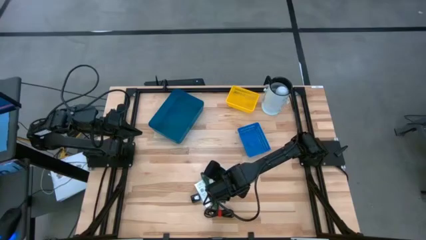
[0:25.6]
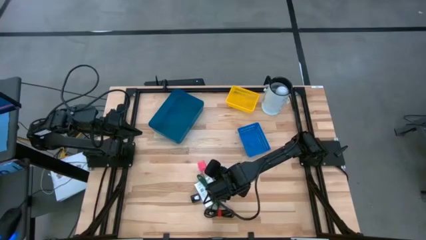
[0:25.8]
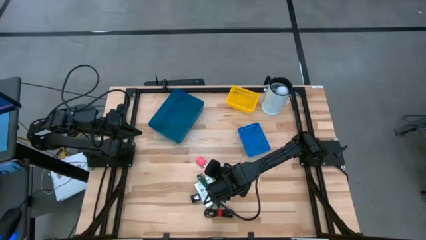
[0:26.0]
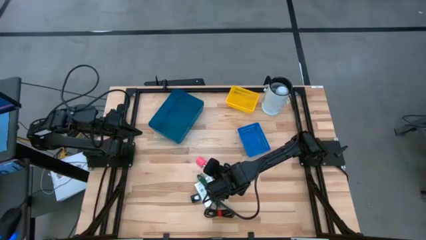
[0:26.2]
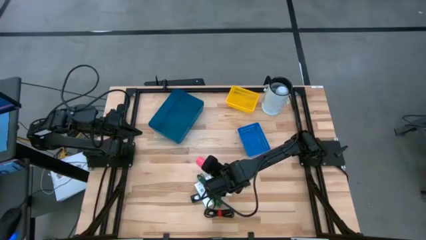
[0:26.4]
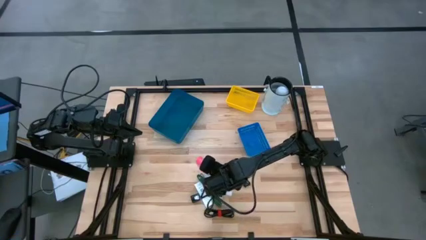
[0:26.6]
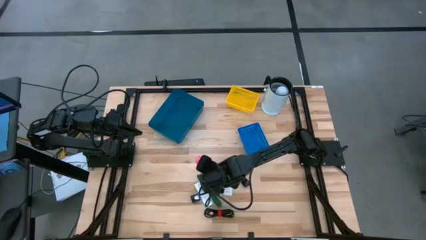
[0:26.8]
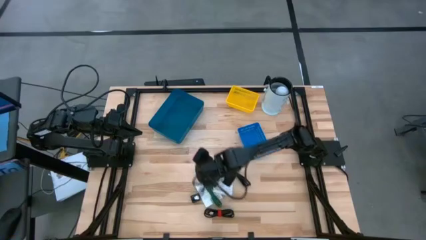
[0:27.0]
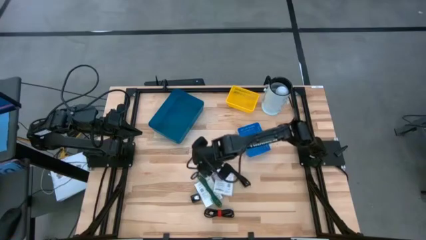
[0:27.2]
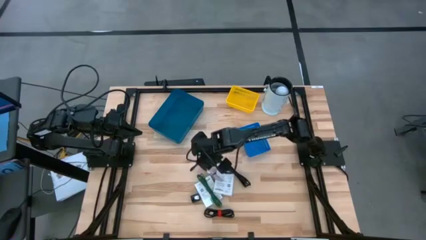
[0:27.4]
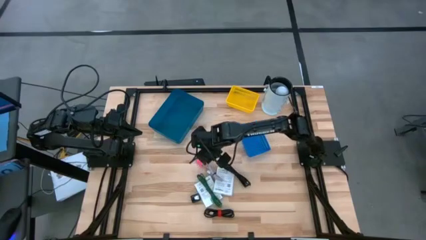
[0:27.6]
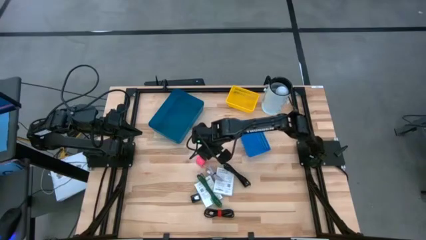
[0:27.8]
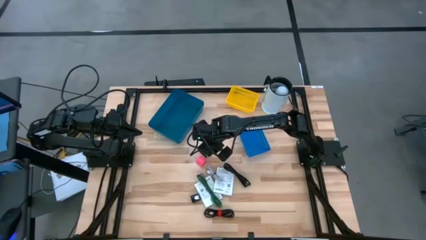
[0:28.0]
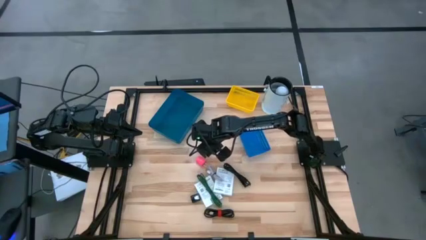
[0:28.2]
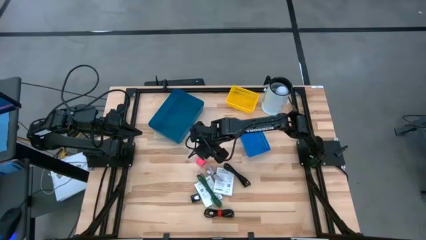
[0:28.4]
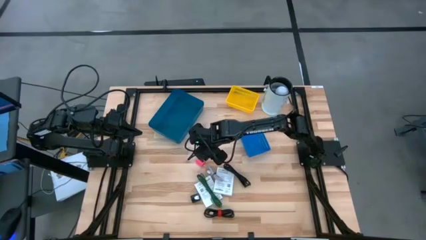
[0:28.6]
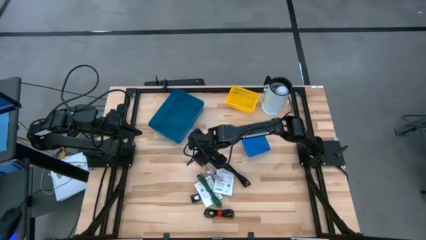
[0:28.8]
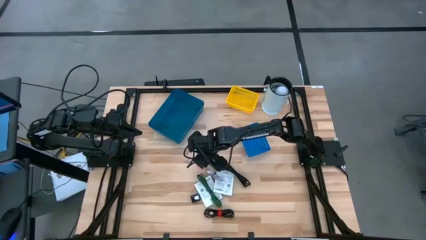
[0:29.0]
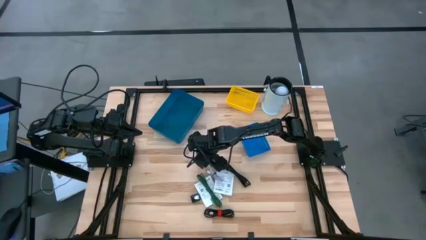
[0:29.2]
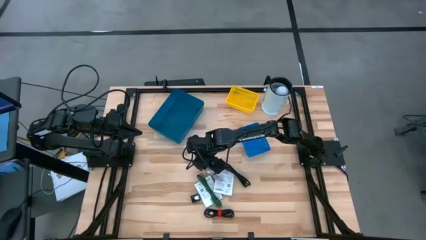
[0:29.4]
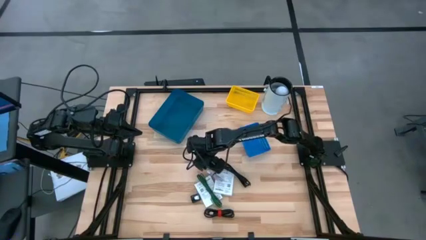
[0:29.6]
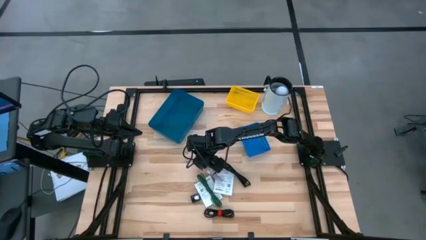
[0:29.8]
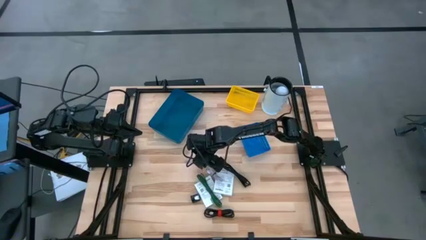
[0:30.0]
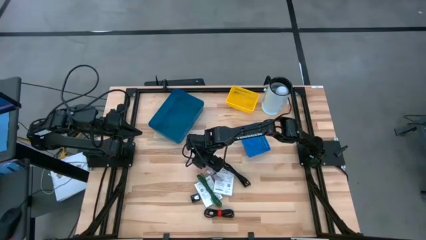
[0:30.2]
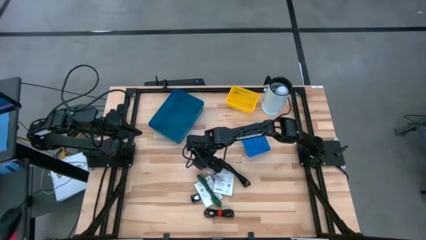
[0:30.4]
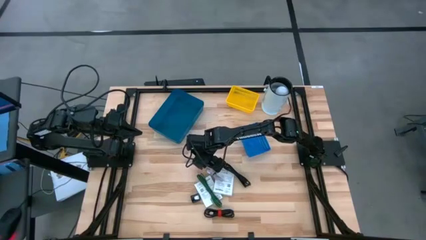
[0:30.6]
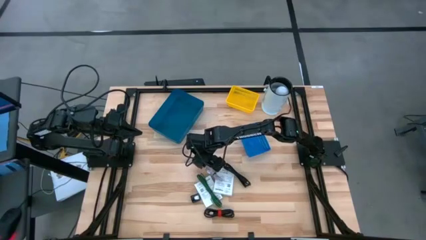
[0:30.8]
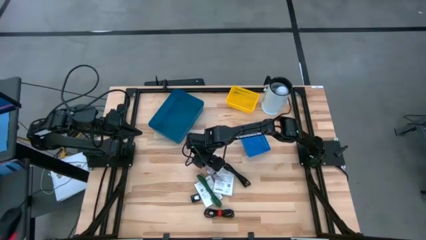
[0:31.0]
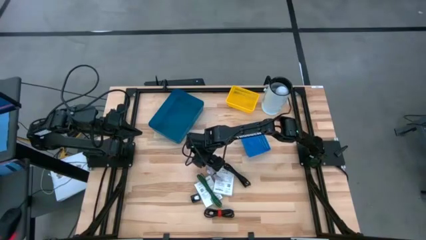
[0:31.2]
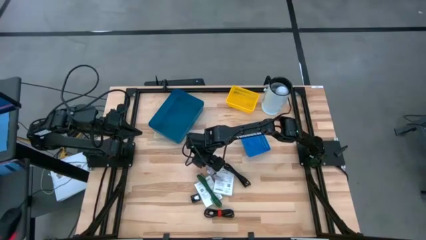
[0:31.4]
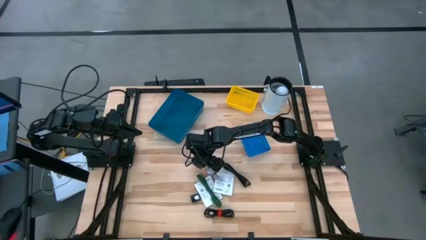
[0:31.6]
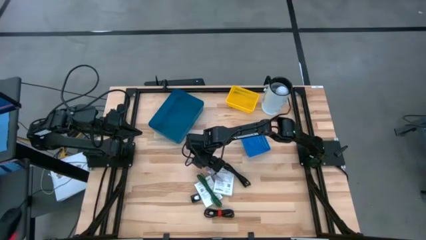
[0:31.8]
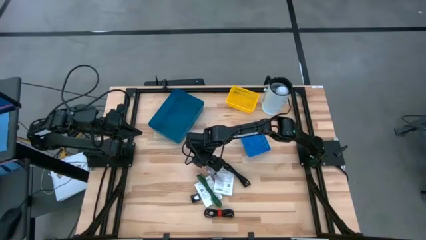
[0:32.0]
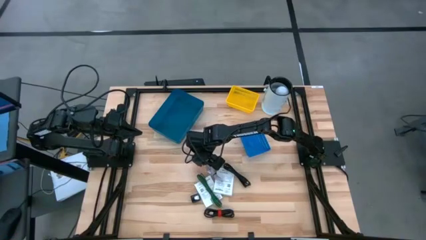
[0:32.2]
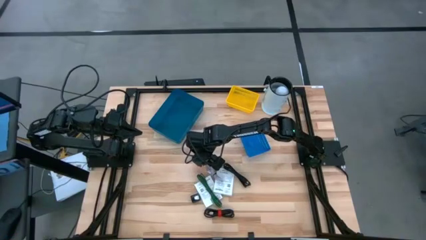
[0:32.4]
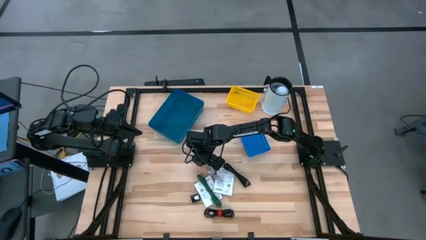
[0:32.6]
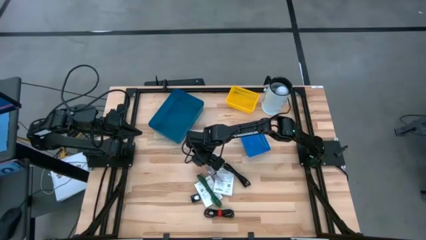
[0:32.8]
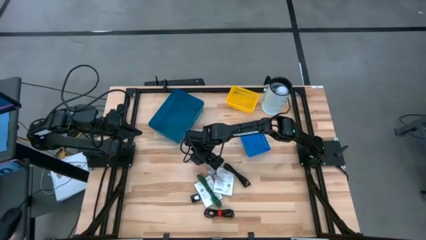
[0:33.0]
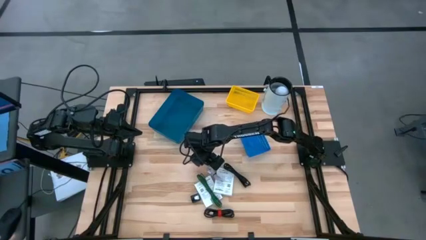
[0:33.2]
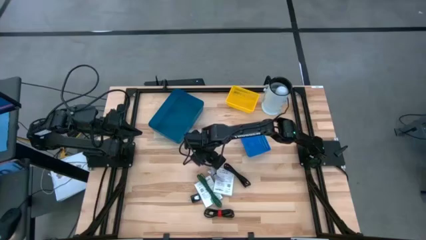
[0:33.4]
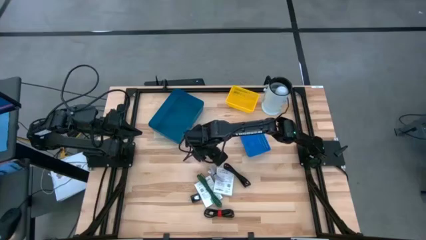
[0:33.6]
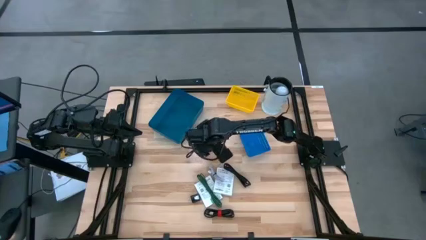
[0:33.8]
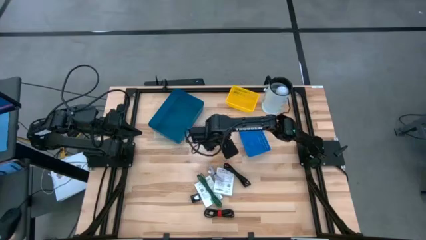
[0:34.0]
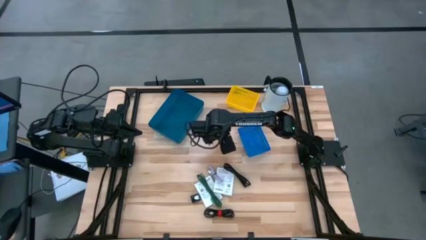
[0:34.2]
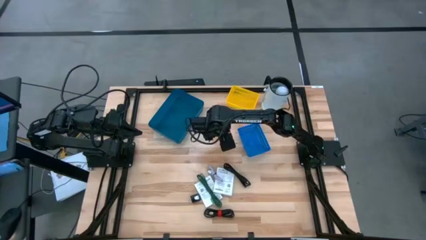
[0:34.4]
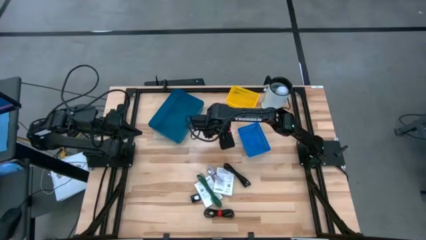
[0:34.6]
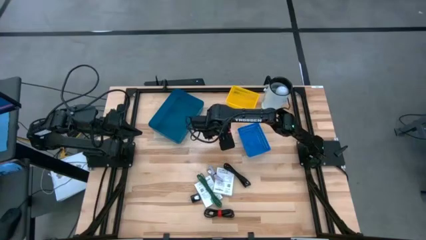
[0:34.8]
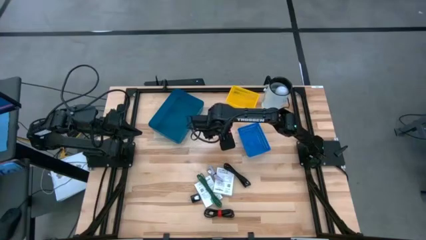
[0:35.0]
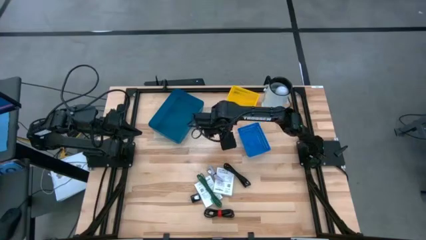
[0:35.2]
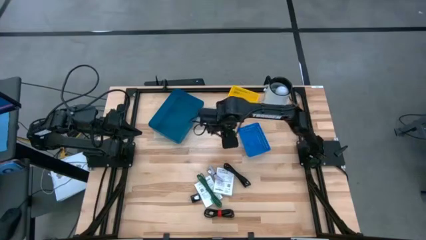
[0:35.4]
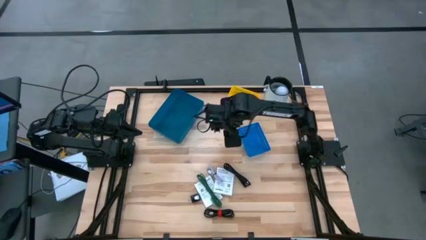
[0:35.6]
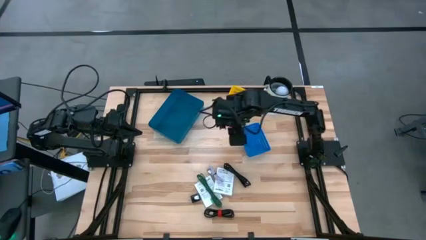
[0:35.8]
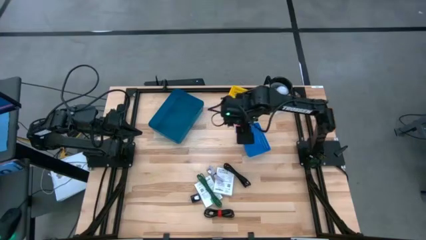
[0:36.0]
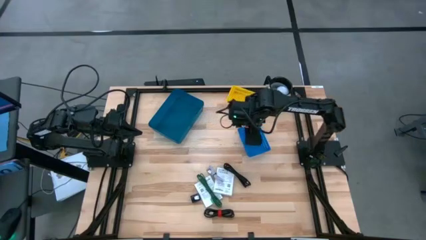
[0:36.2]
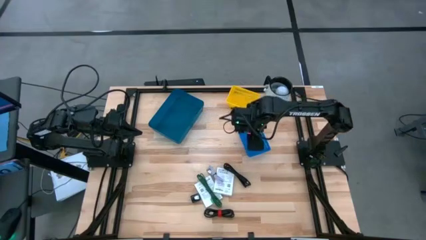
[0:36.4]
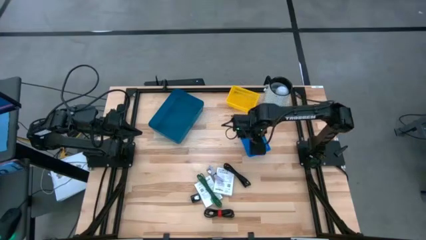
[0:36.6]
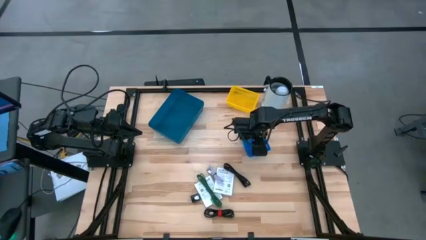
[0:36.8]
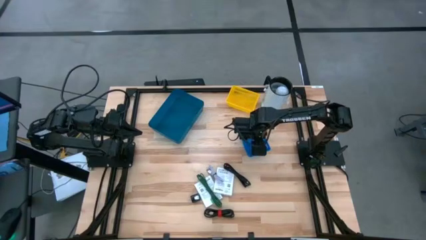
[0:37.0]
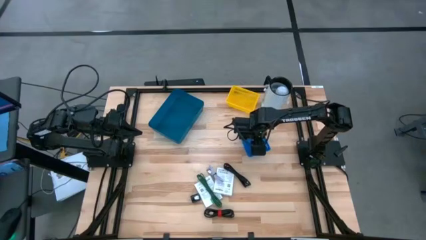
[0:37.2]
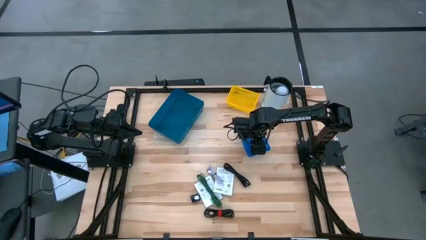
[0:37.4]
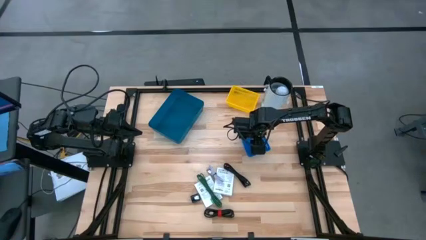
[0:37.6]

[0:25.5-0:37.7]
Task: Pick and place items into bin
Put the pink charger adapter into the blue bin

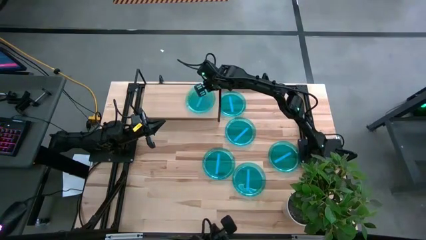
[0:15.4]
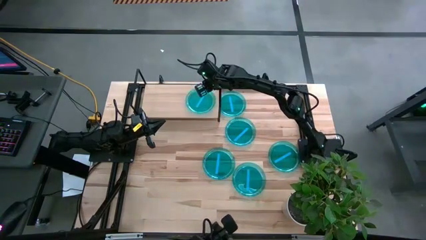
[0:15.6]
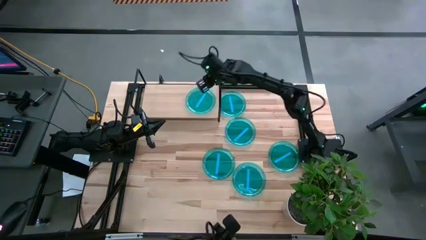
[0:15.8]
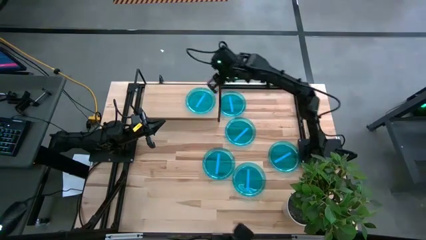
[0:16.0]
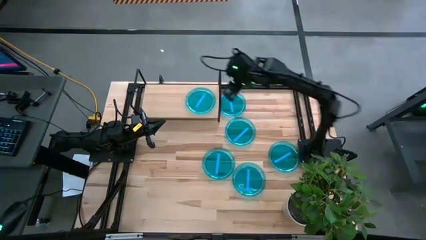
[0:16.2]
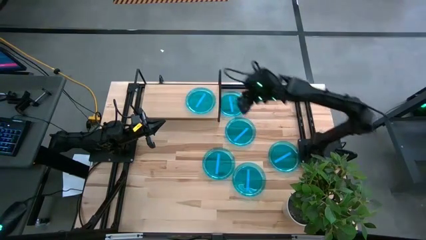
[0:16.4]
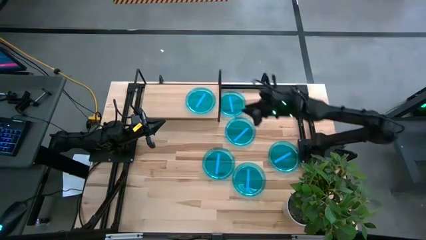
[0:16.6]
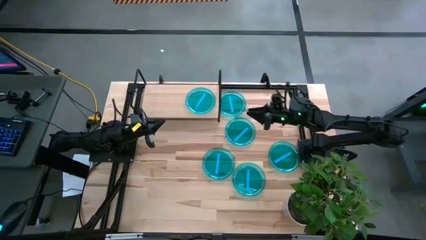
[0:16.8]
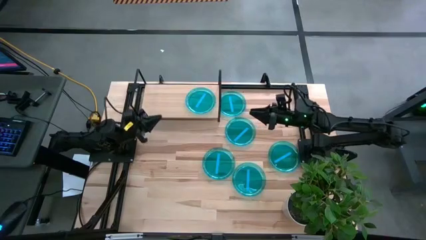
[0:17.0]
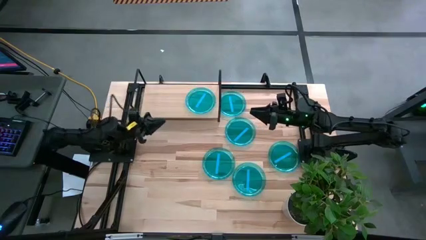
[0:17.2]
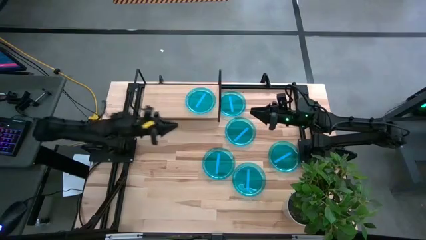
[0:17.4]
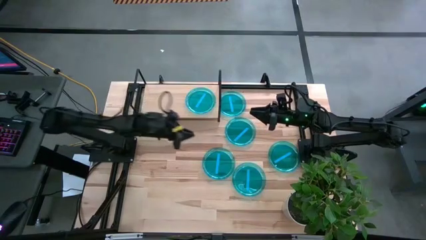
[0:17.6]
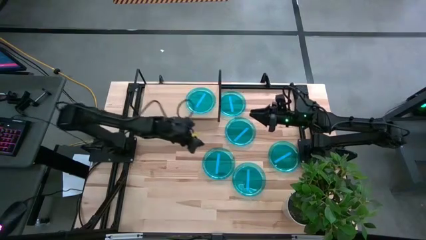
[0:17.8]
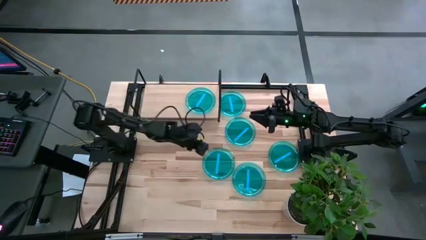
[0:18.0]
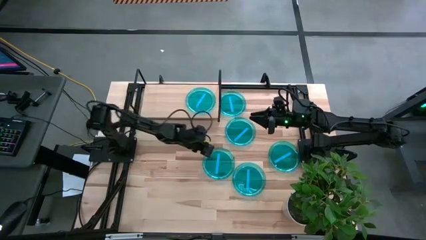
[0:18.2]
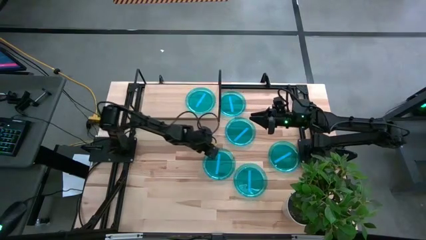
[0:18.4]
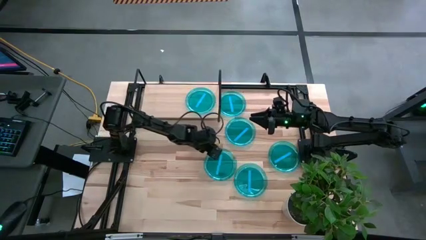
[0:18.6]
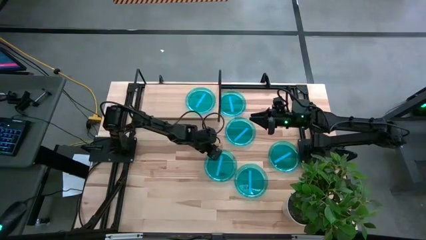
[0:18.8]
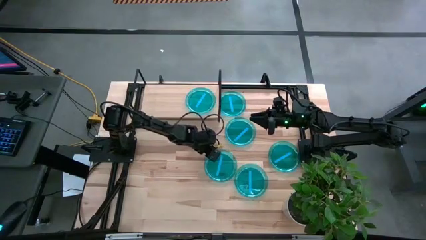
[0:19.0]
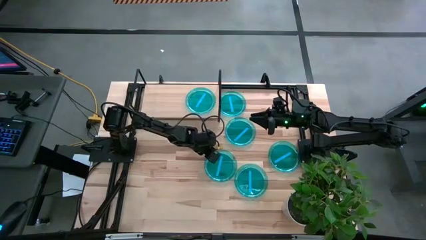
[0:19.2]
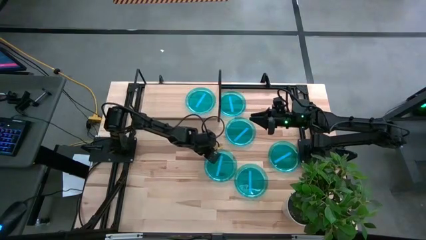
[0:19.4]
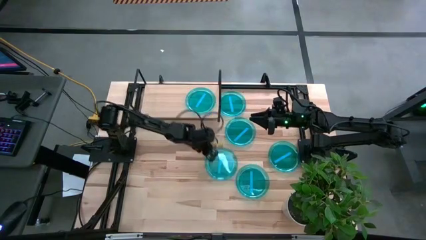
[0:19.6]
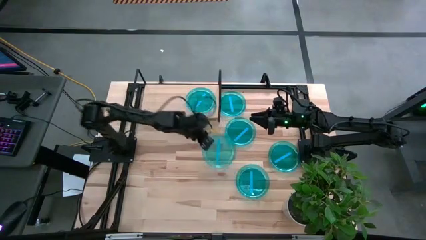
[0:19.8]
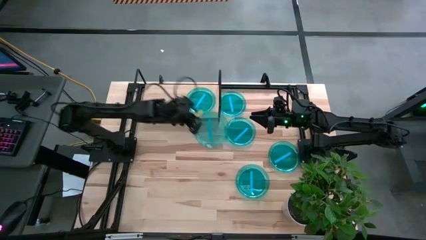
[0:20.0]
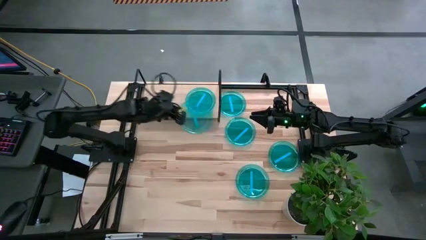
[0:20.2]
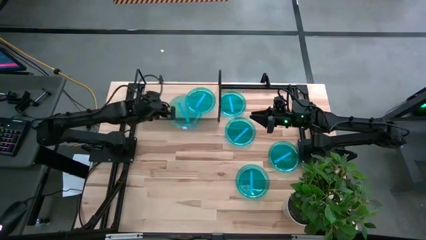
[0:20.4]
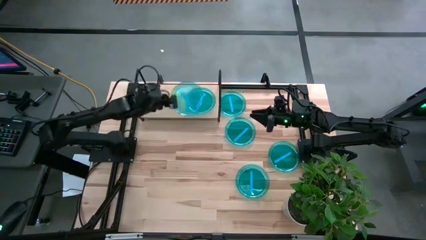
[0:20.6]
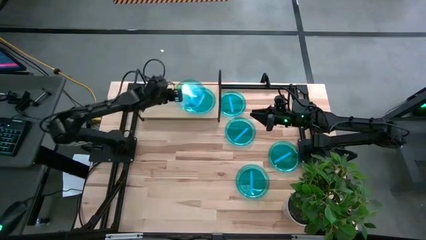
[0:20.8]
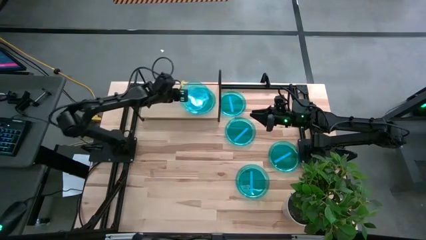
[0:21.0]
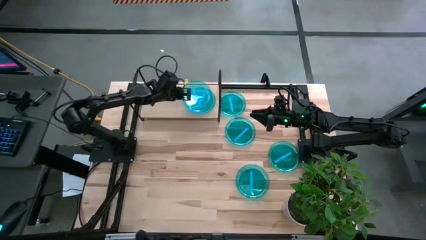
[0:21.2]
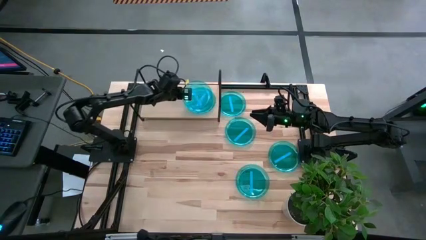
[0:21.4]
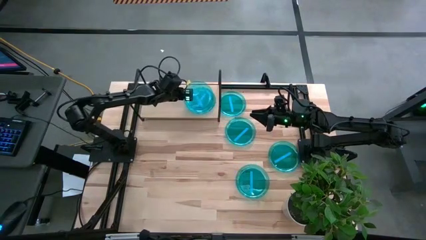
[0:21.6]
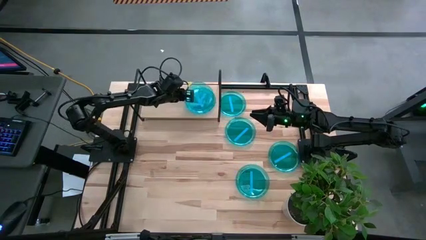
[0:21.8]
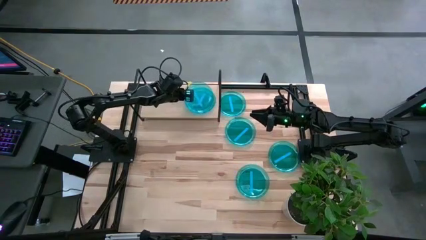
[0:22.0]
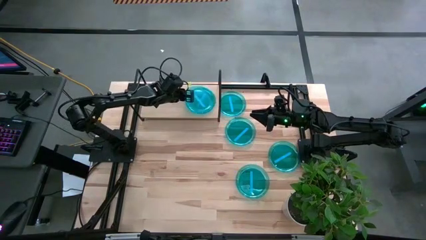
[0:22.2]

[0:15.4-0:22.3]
Task: Place and stack plates onto a shelf
Stack the blue plate on top of the blue plate on the shelf
